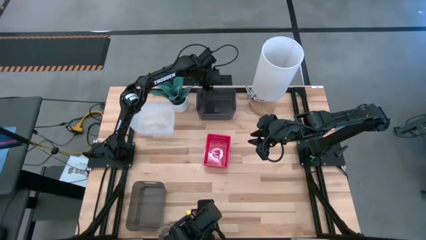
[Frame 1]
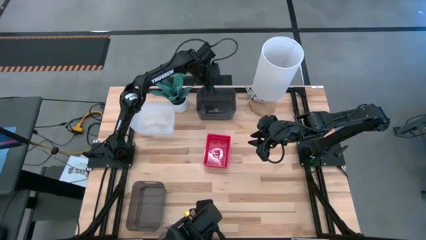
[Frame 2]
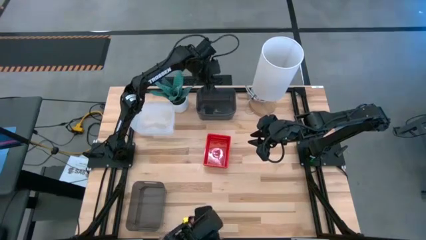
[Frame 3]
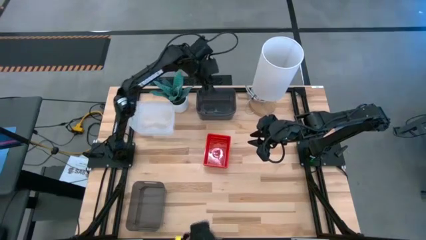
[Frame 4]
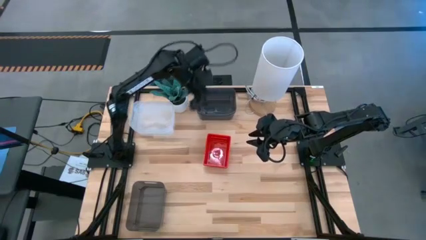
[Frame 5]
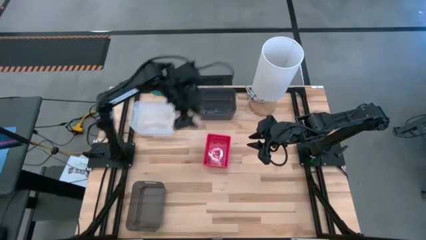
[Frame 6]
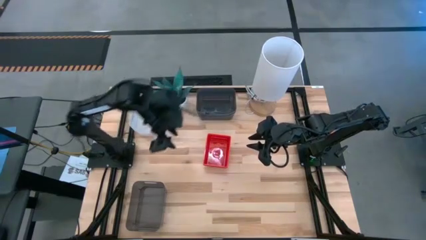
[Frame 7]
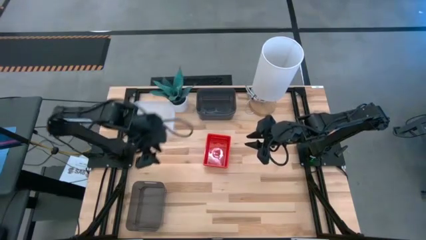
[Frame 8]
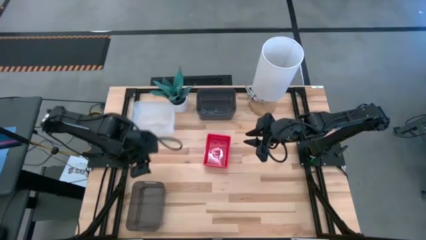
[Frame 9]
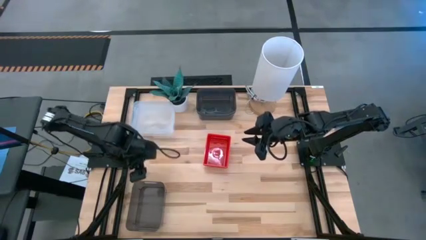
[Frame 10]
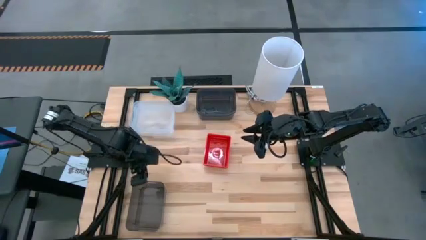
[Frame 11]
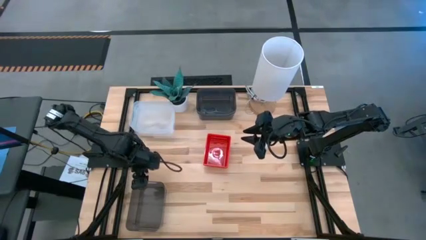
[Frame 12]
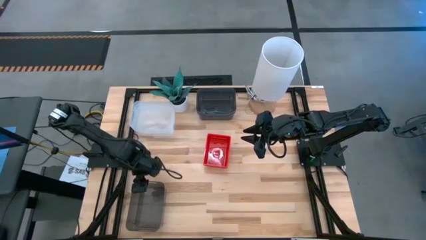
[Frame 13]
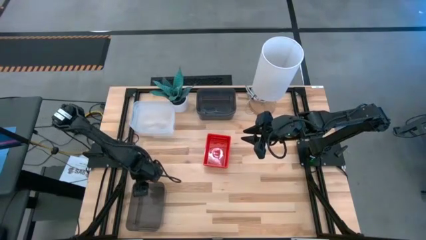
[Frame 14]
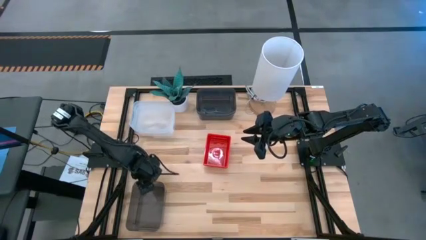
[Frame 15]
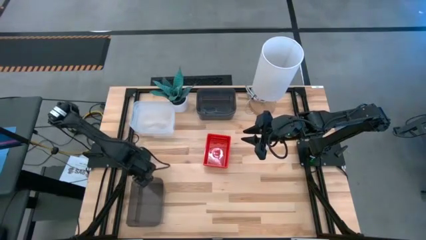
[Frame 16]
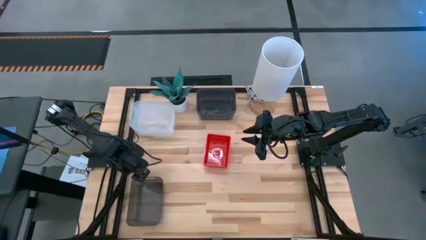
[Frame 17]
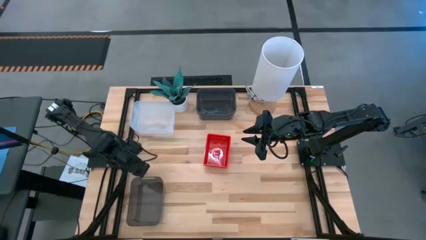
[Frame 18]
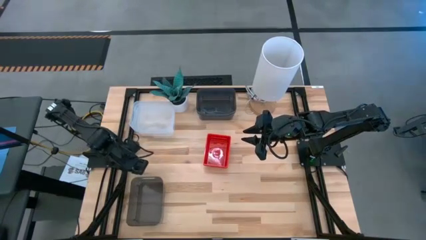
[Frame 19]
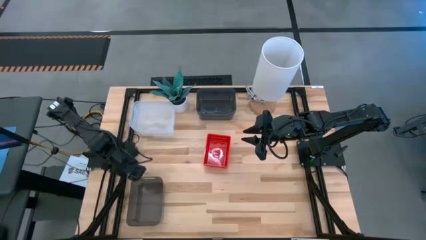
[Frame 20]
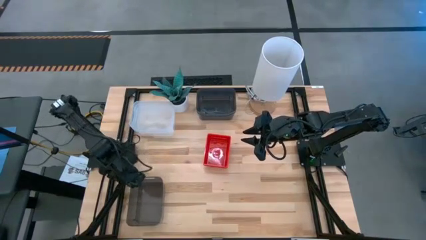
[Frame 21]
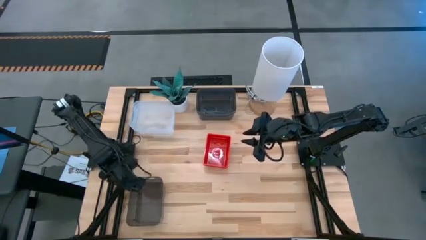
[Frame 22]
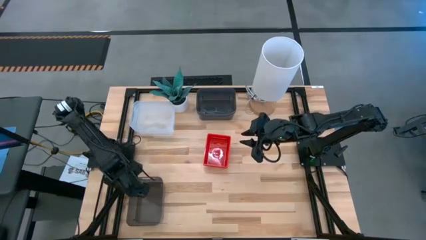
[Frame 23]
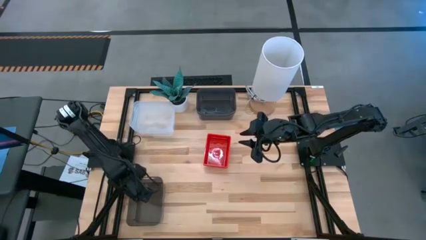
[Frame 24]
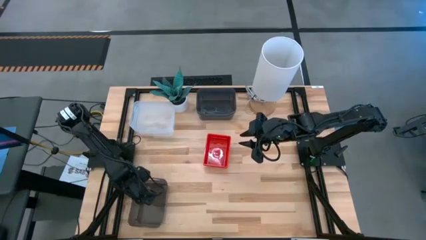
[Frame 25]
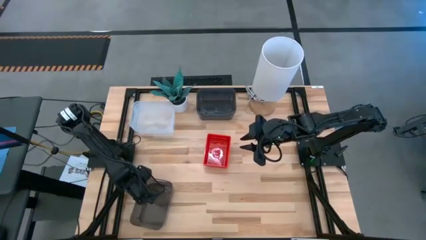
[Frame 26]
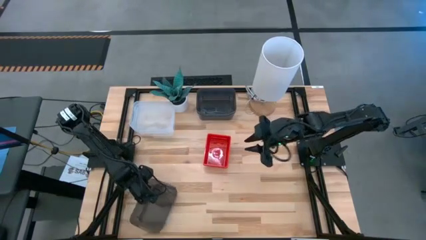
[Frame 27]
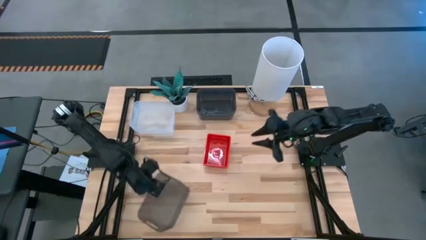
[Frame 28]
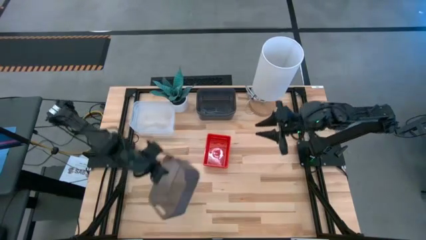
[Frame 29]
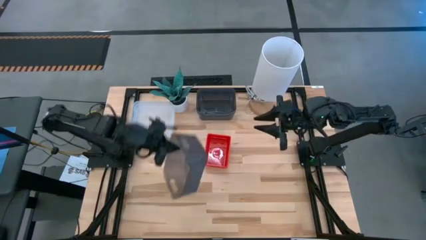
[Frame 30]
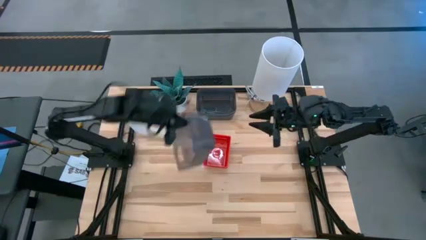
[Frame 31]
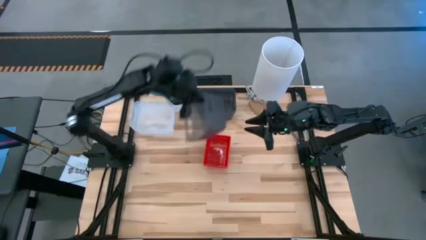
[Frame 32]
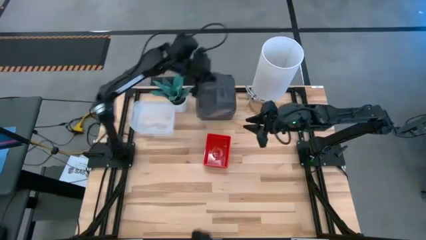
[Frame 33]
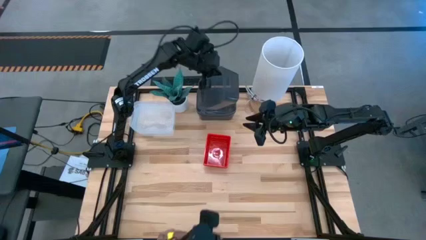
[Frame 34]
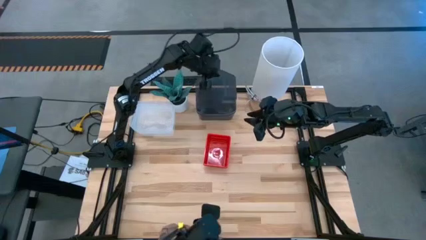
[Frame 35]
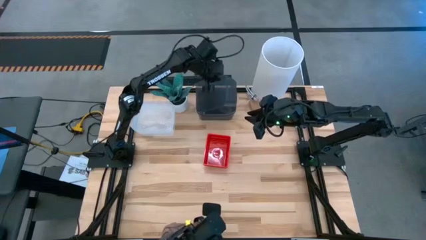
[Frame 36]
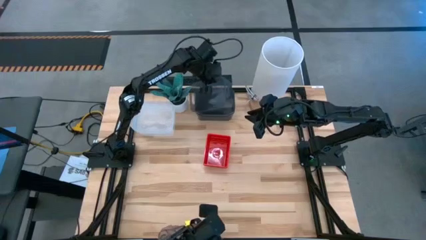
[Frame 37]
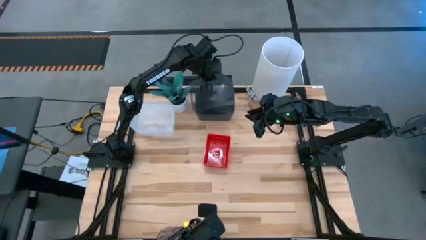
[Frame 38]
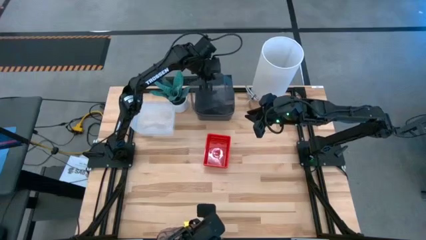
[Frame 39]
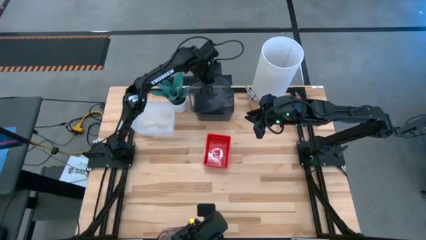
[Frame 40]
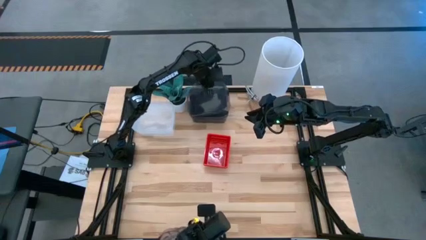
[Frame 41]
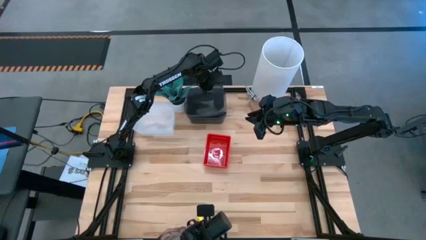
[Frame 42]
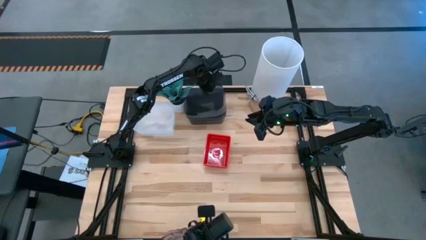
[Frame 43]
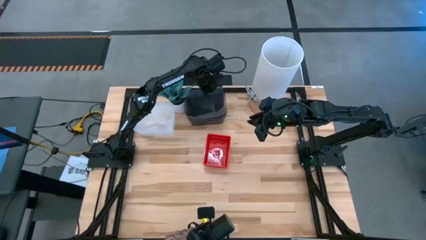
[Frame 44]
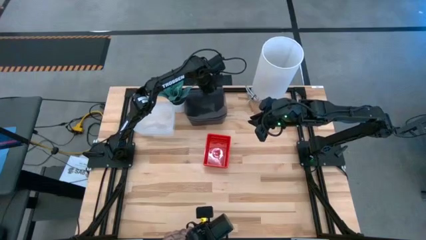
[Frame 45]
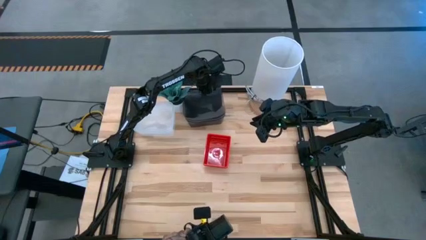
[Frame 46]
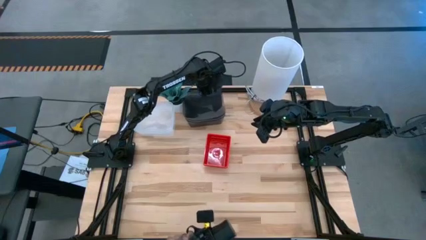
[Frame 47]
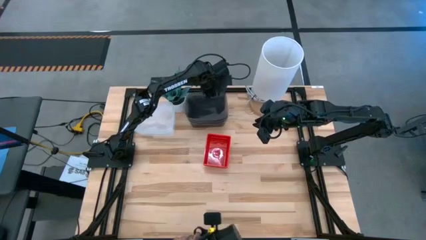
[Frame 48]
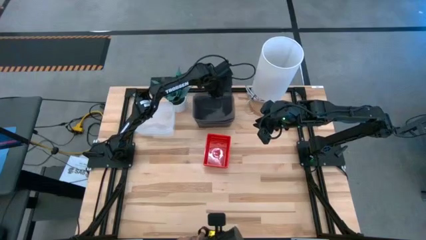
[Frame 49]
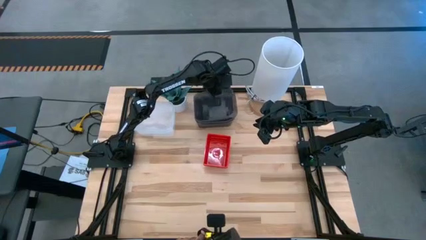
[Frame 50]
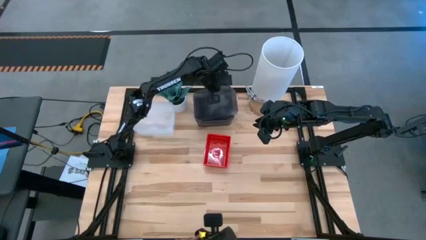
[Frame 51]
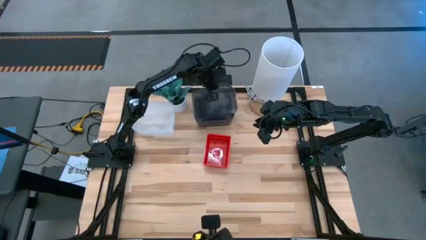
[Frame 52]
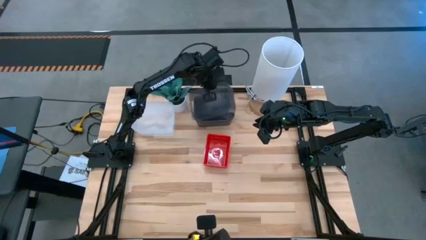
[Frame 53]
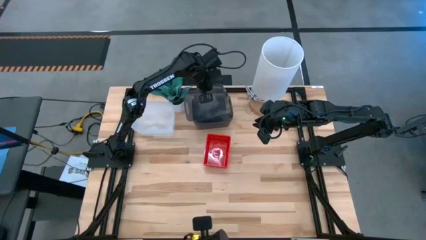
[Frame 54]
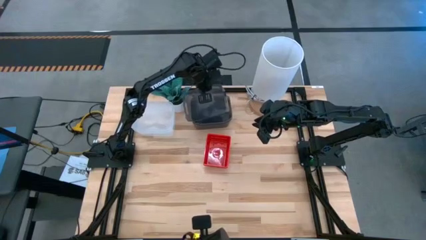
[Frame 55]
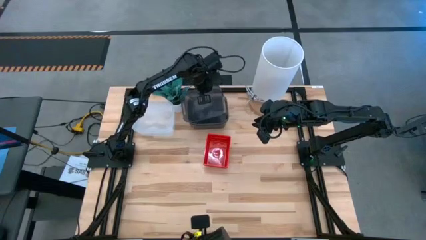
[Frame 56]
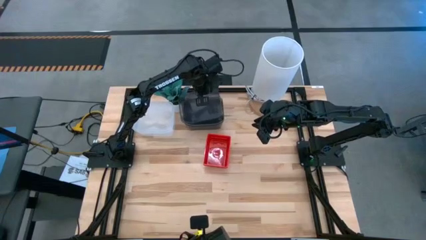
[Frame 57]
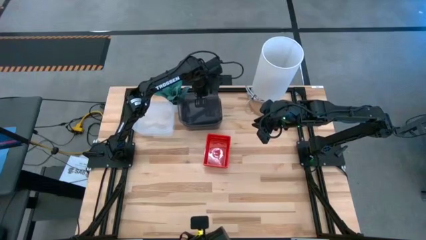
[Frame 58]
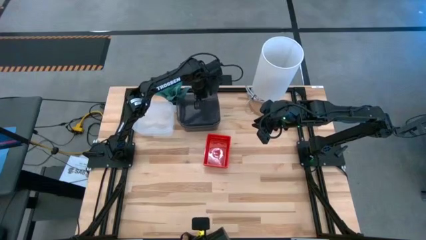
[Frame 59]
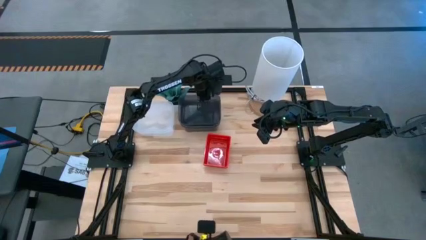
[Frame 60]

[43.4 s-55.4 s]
Stack the bottom black bin on the top black bin

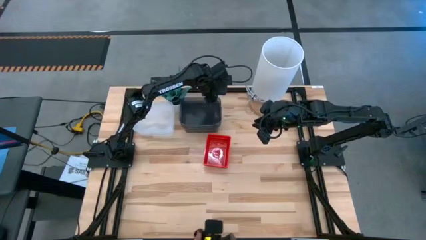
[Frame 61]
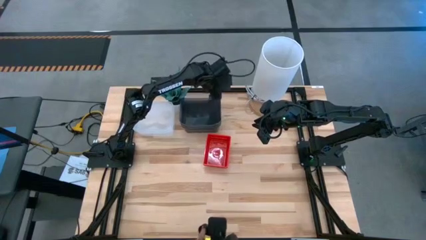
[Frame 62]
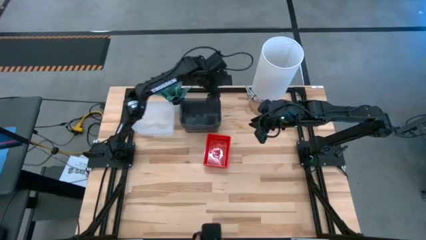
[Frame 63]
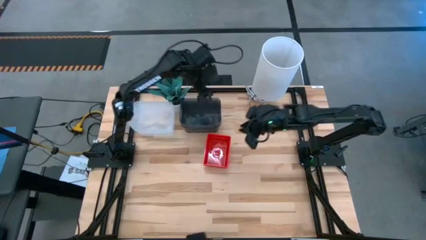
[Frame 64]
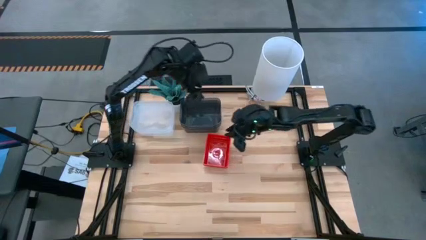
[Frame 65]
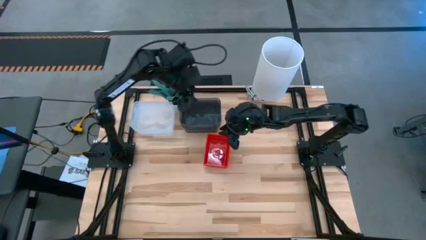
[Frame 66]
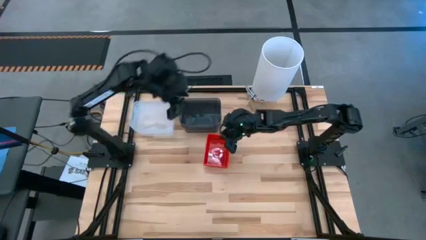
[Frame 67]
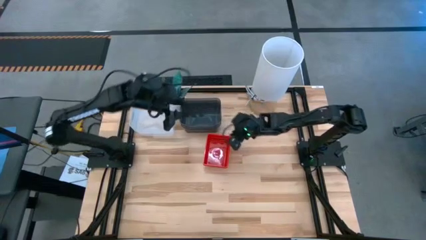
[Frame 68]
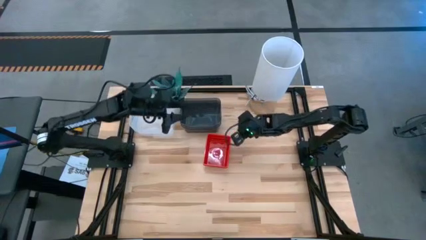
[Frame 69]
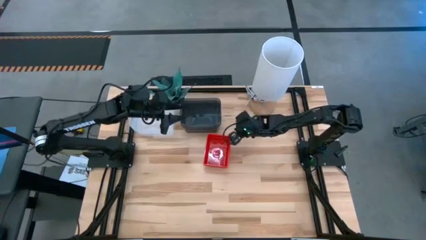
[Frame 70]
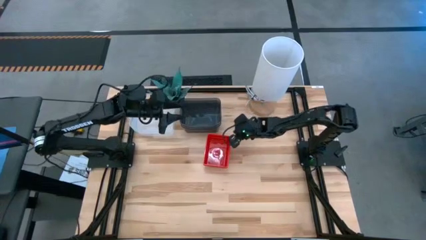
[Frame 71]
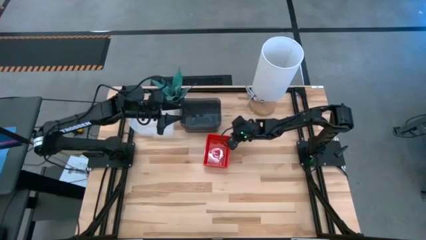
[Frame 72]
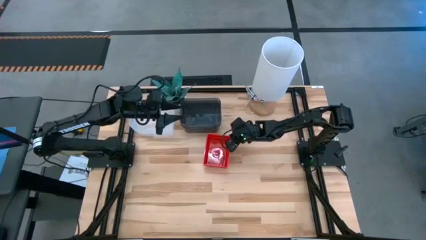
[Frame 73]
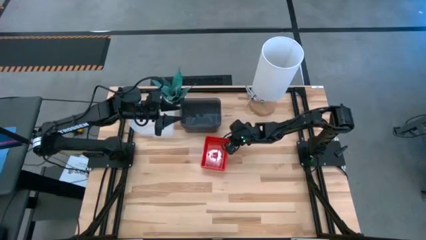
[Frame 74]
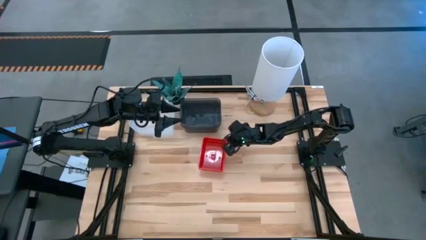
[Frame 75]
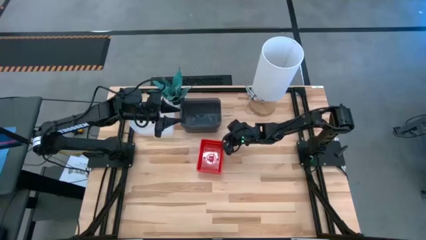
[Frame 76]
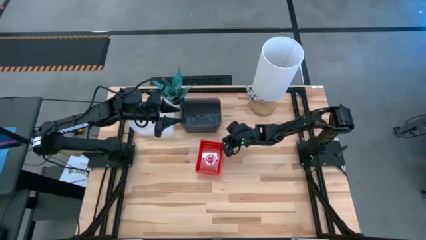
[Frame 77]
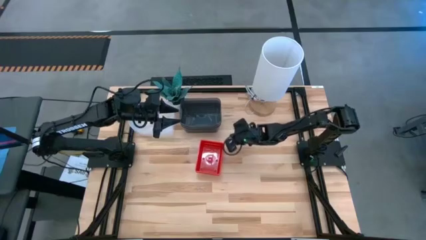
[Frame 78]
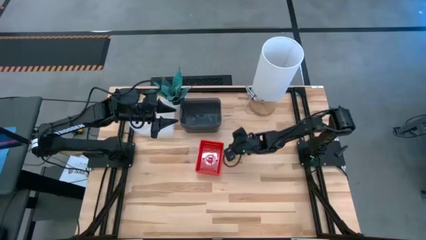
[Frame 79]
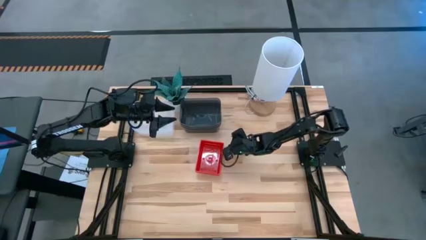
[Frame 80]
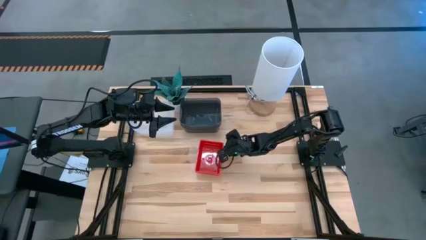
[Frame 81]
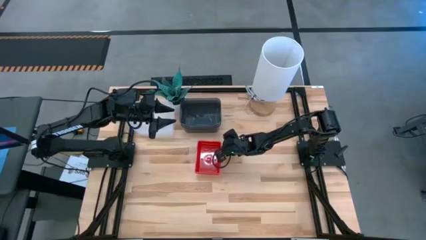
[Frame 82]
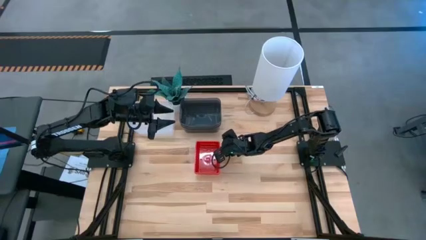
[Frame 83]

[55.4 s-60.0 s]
Adjust the stack of red bins on the table
